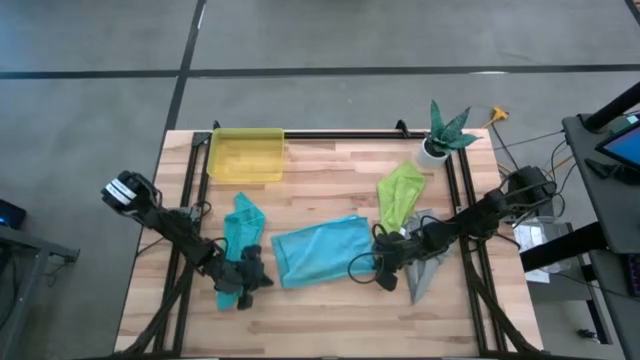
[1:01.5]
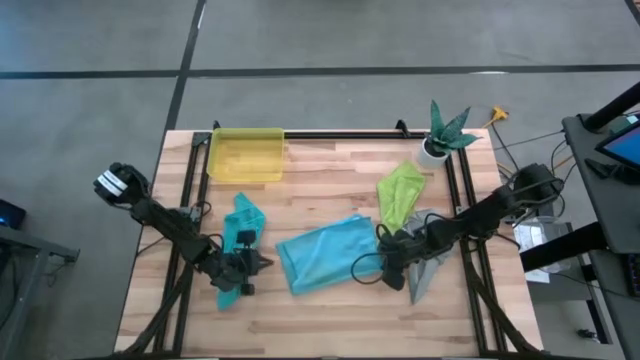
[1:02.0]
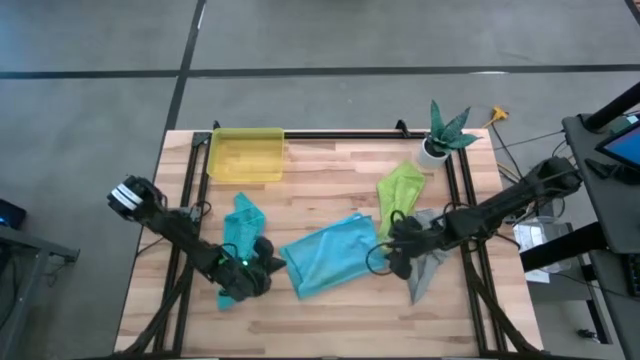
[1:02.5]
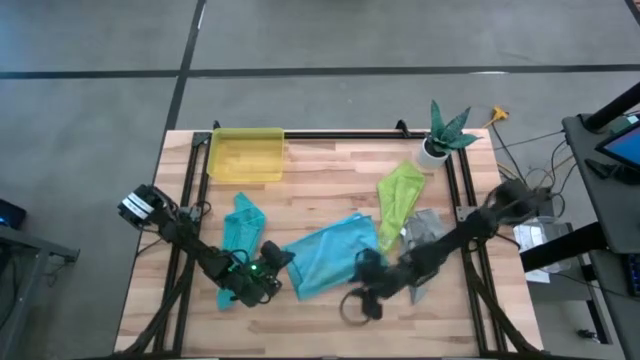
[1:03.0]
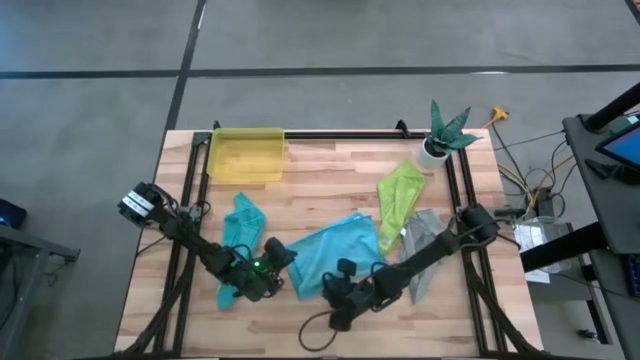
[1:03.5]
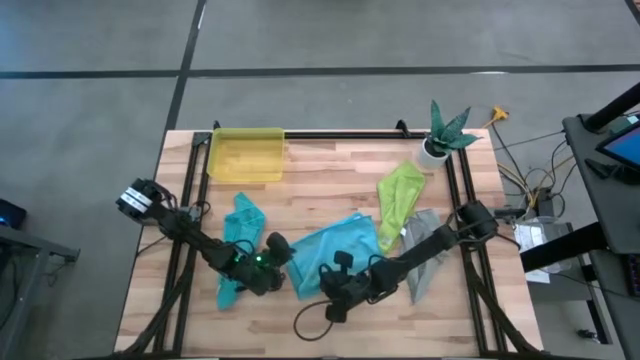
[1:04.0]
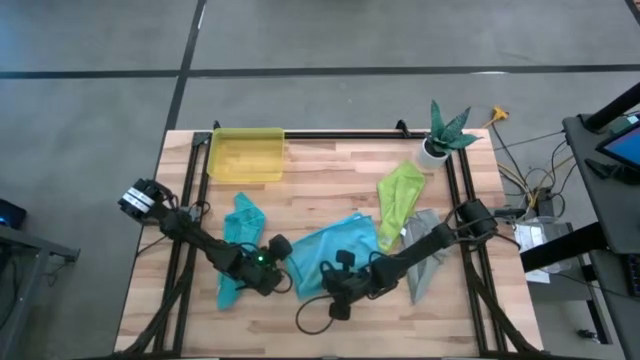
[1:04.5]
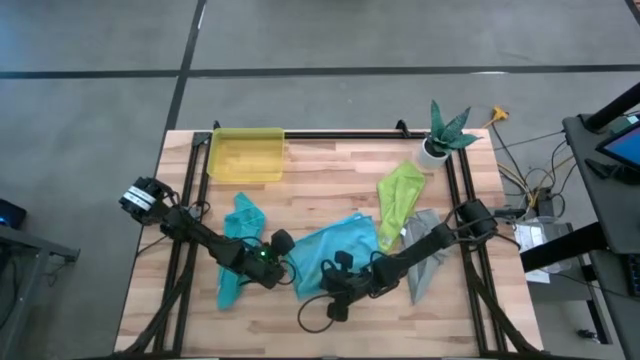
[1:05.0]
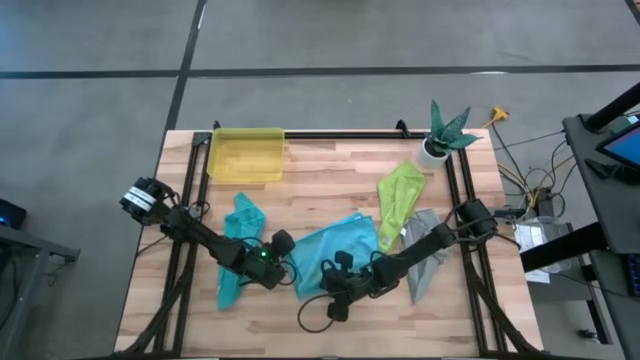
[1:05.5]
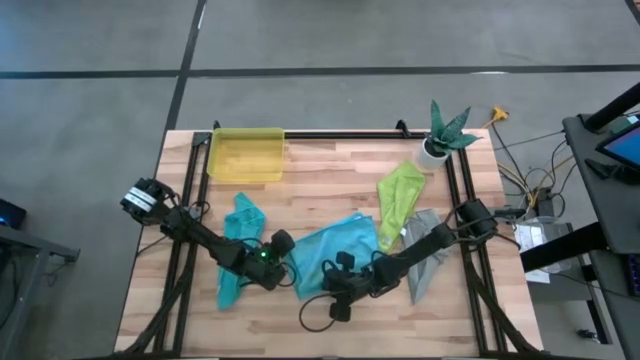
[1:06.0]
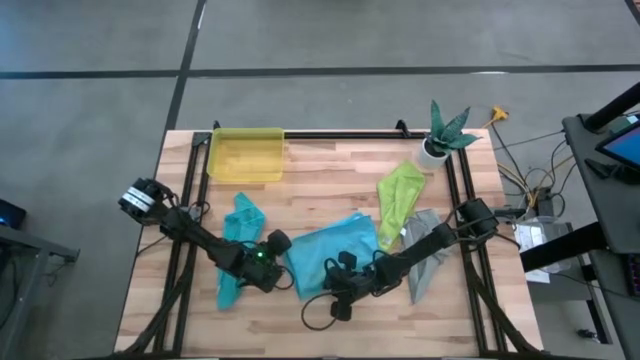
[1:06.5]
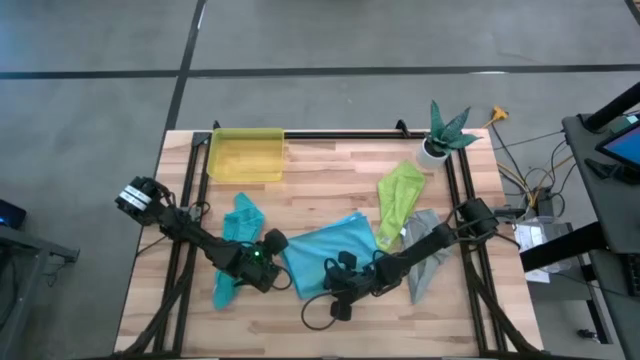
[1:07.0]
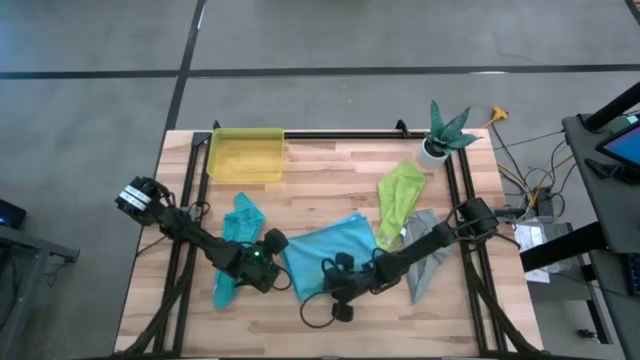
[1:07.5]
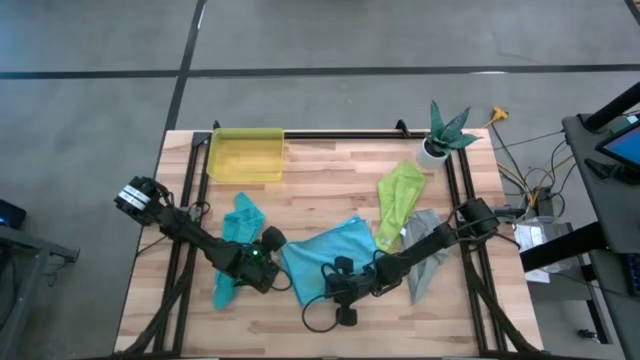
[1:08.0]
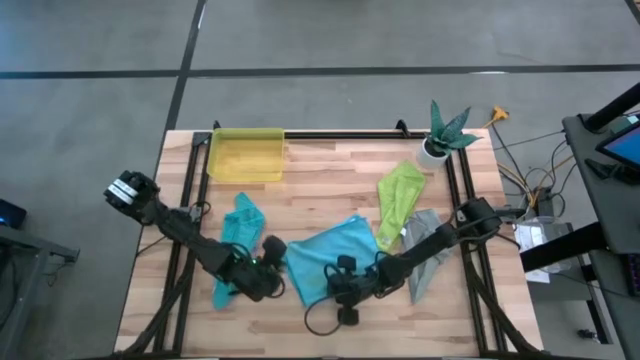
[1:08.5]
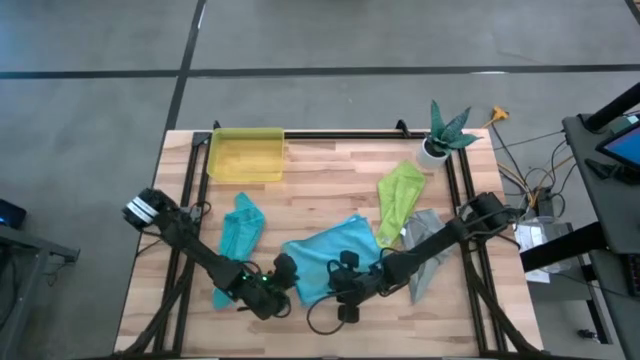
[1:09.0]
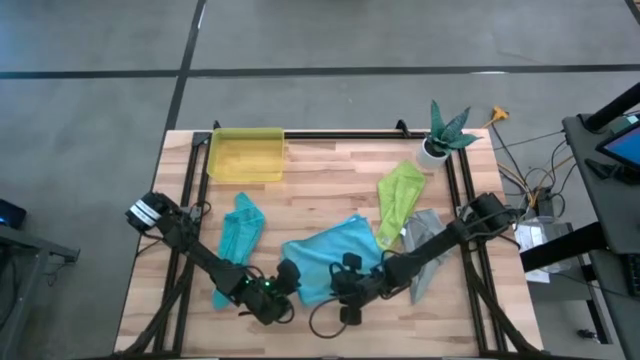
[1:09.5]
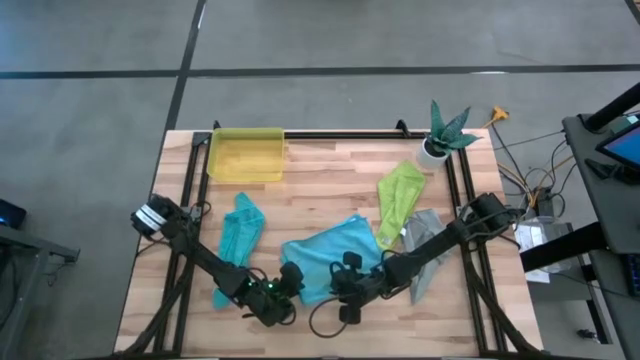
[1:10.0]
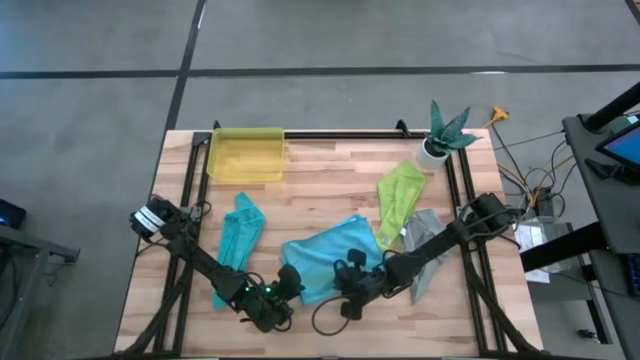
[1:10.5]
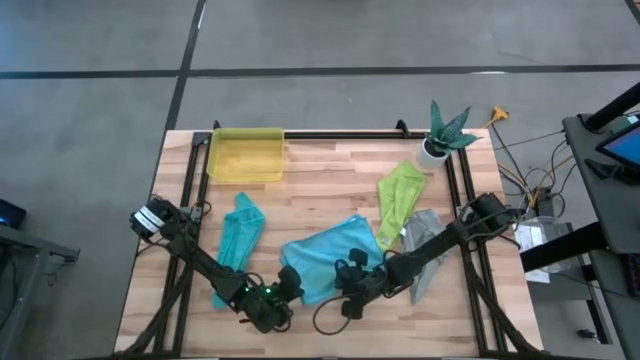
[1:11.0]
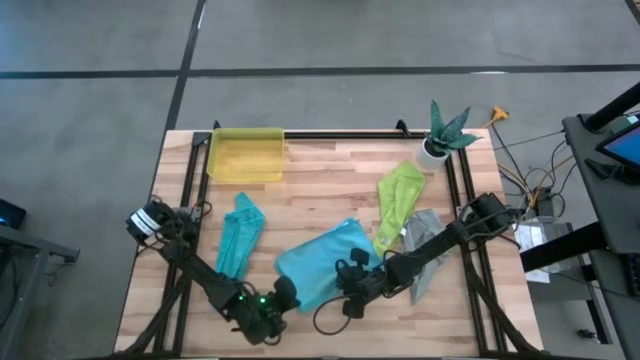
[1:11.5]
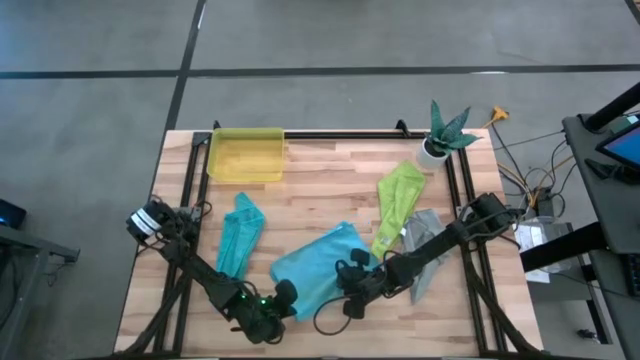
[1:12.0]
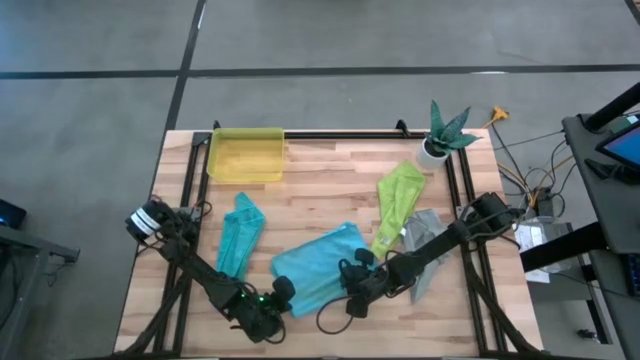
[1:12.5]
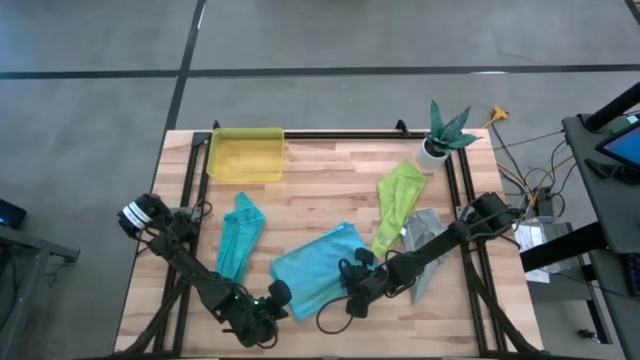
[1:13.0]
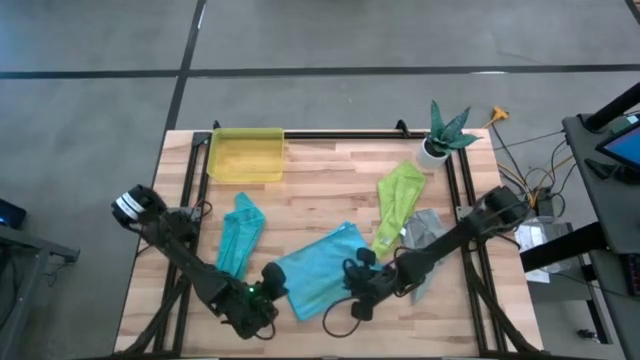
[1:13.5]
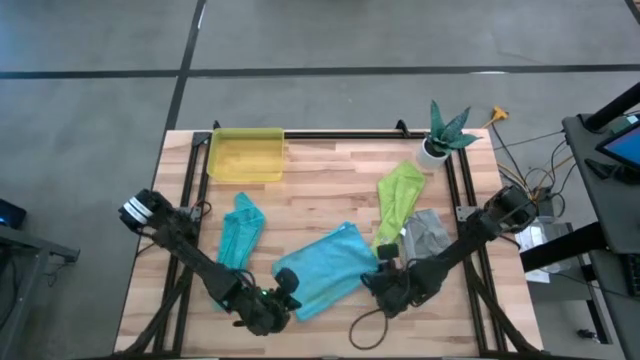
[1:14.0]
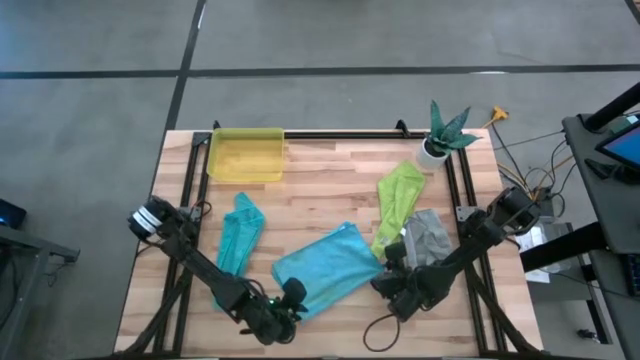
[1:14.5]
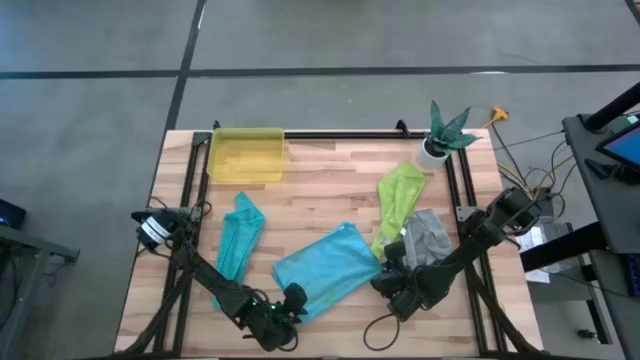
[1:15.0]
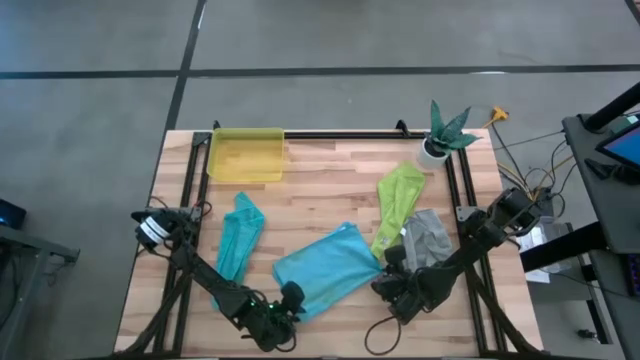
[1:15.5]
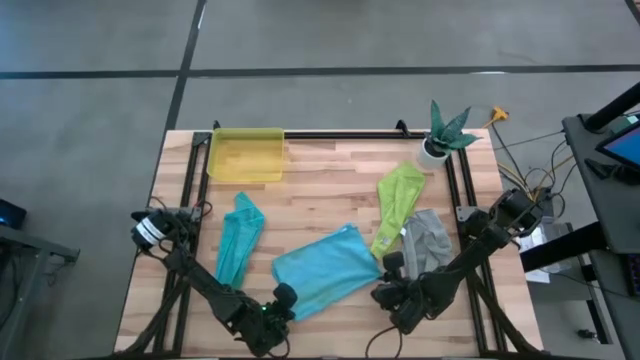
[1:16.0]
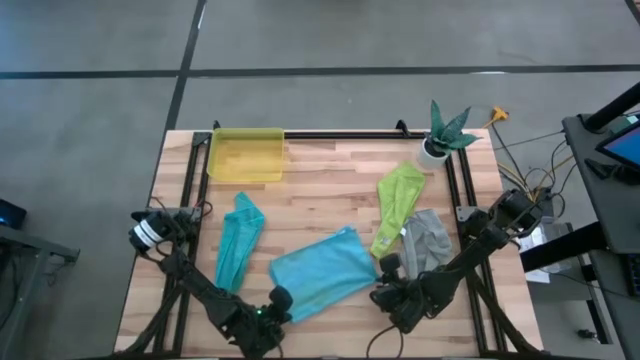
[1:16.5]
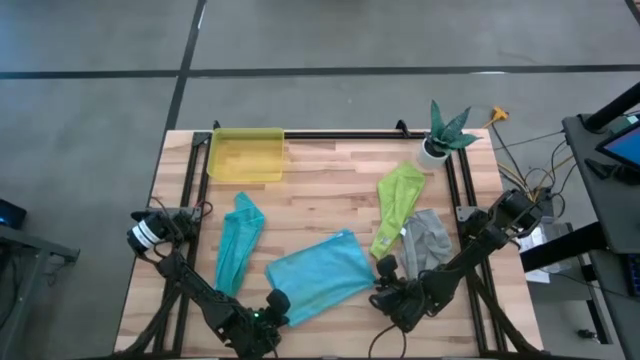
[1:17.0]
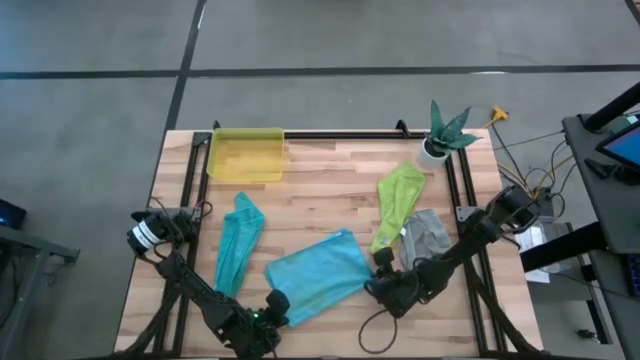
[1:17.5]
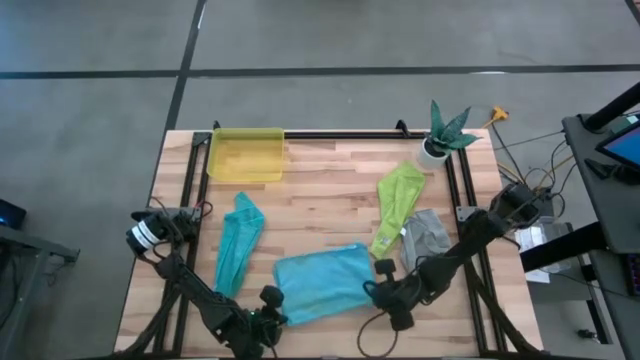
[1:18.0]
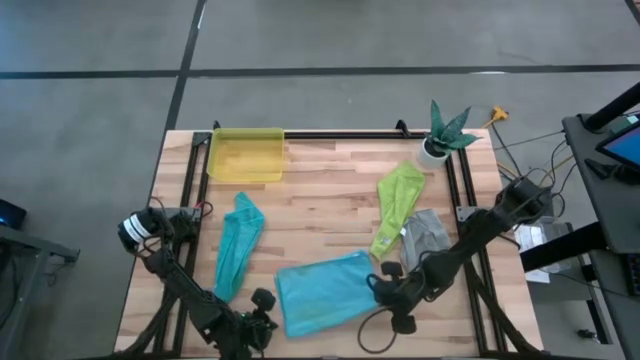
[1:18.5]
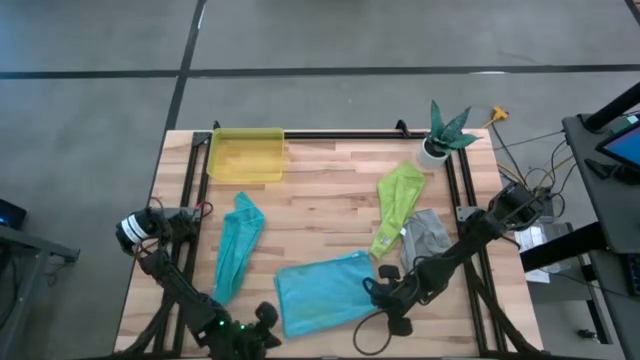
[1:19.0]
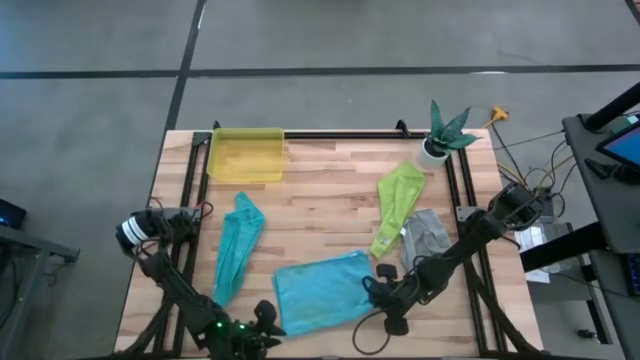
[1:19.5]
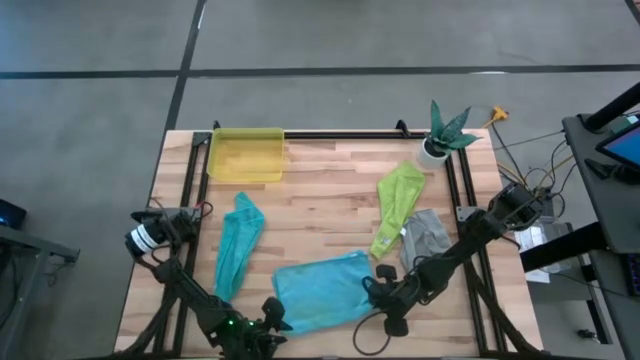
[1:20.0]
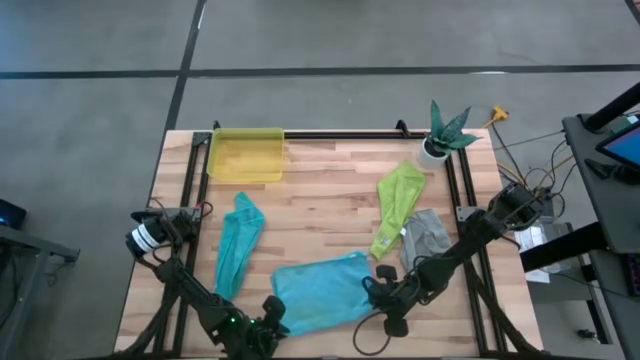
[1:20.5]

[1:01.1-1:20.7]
Task: Roll microfiber towels into tight, uniform cylinder then place into a basket
Roll the right light blue towel
